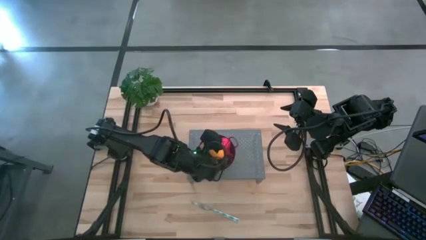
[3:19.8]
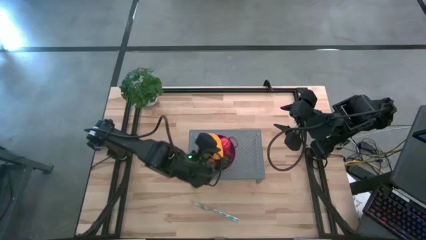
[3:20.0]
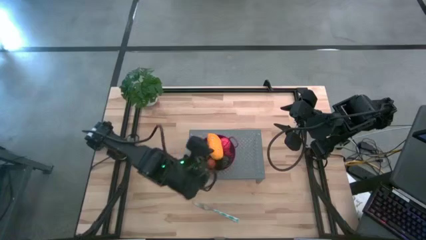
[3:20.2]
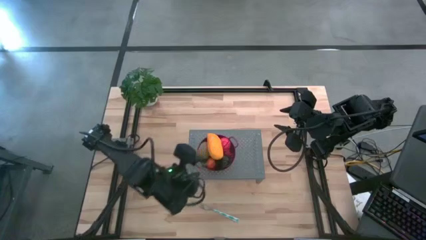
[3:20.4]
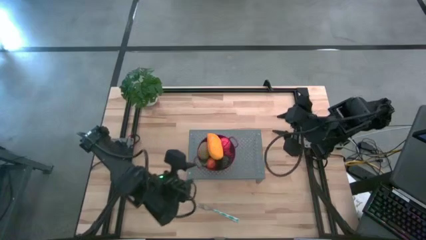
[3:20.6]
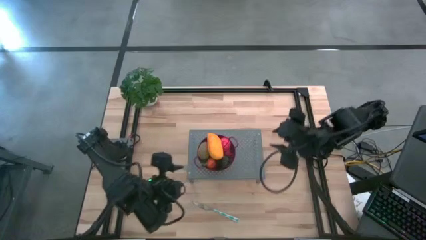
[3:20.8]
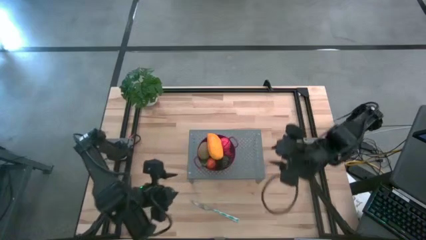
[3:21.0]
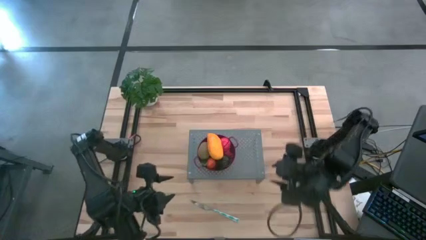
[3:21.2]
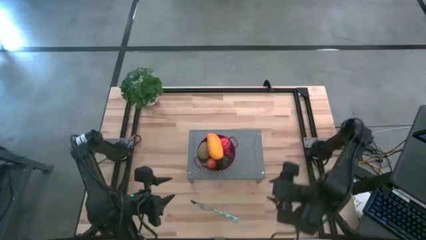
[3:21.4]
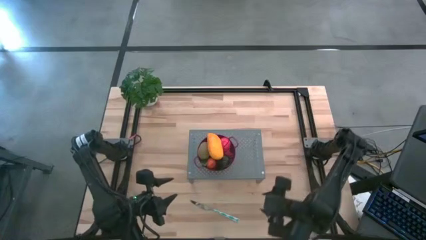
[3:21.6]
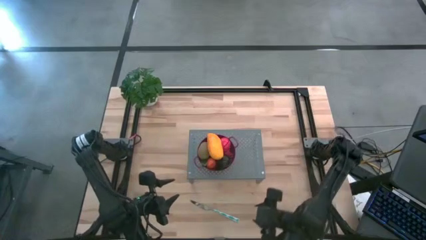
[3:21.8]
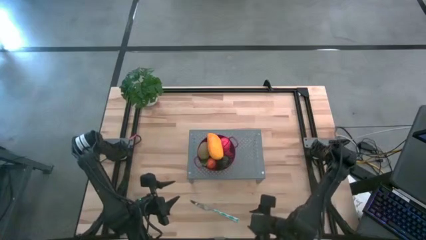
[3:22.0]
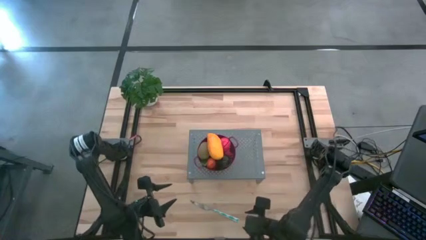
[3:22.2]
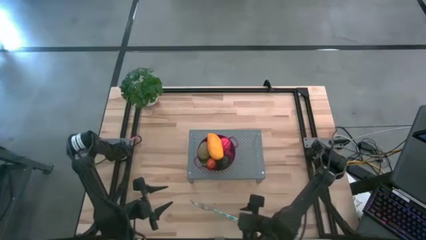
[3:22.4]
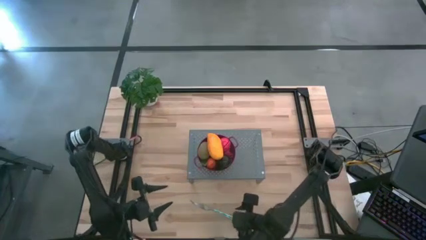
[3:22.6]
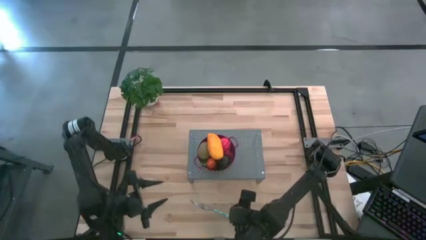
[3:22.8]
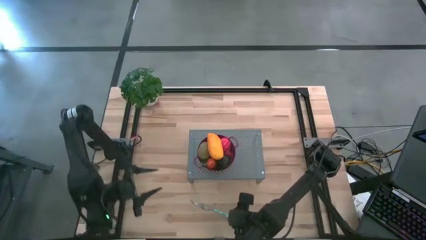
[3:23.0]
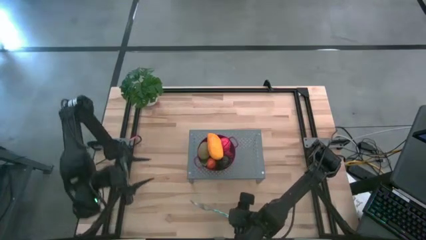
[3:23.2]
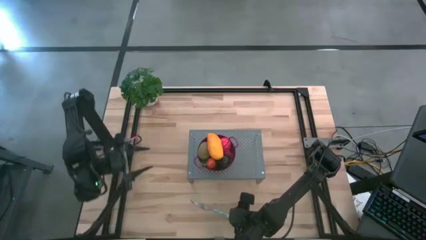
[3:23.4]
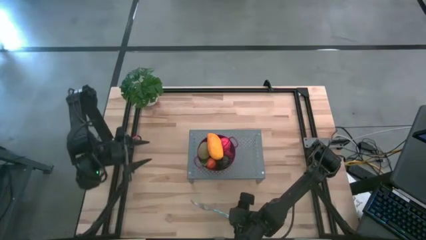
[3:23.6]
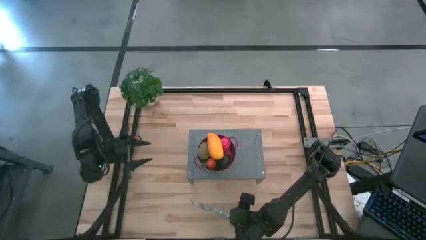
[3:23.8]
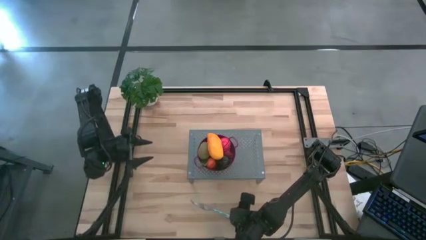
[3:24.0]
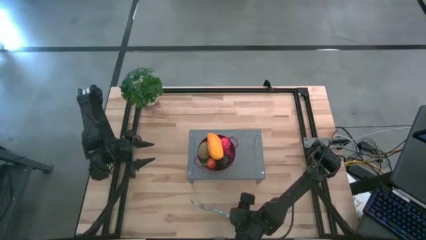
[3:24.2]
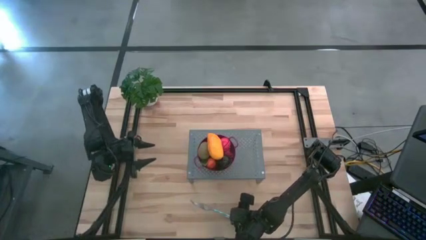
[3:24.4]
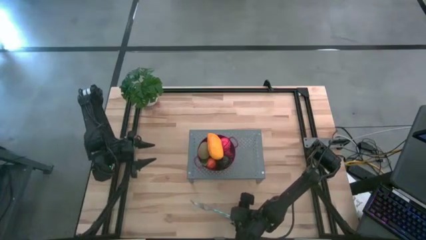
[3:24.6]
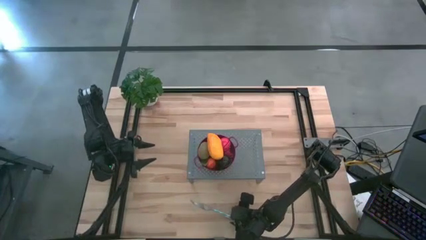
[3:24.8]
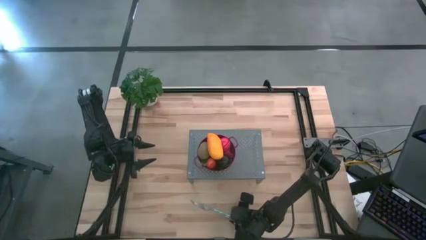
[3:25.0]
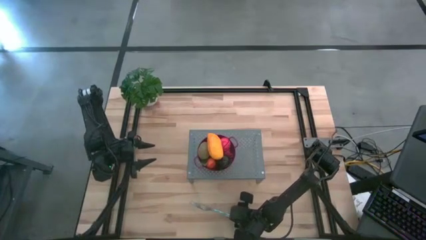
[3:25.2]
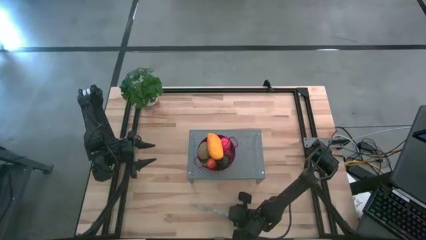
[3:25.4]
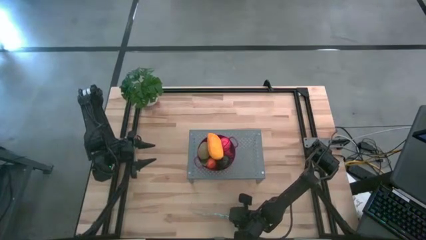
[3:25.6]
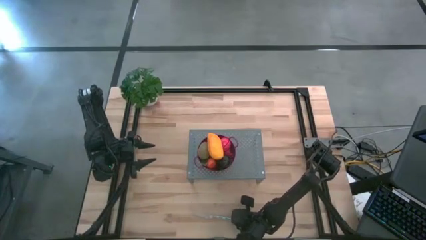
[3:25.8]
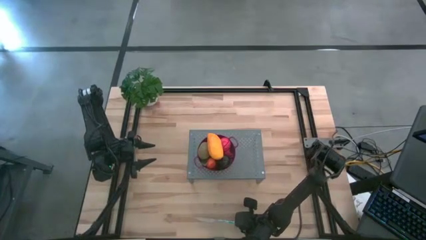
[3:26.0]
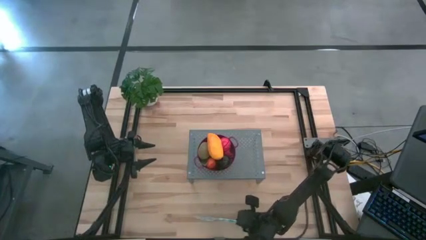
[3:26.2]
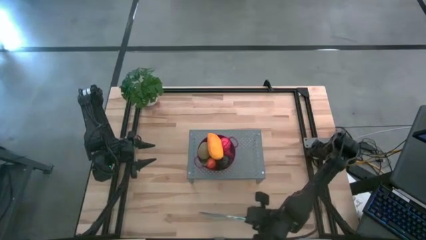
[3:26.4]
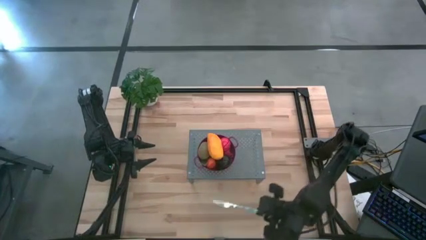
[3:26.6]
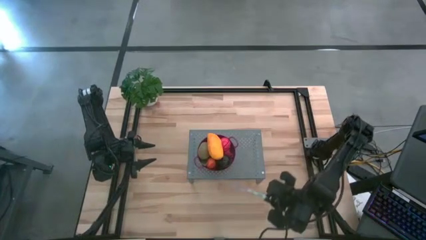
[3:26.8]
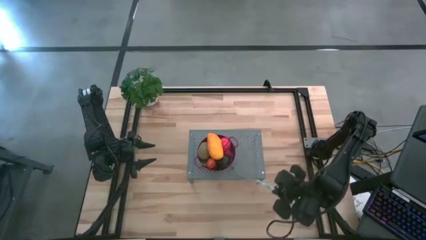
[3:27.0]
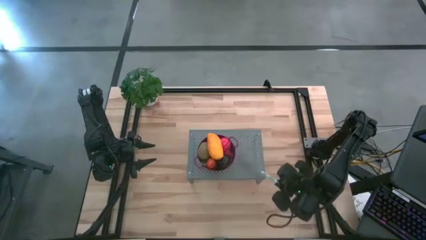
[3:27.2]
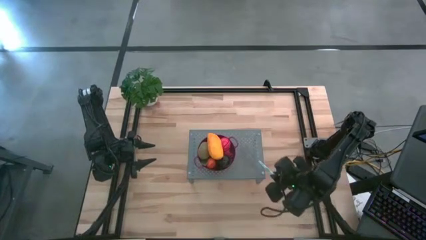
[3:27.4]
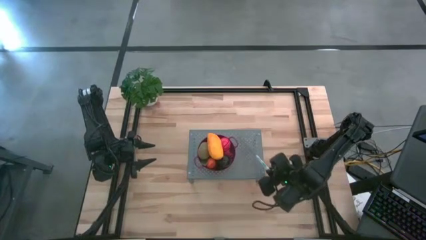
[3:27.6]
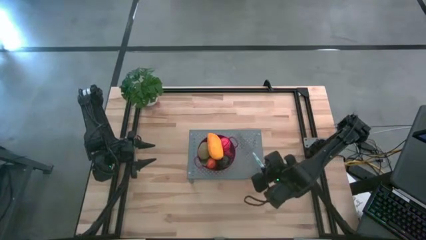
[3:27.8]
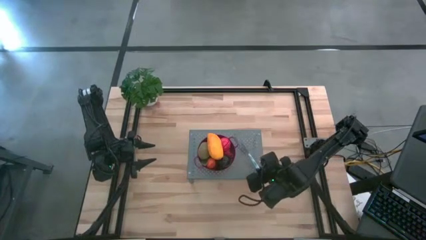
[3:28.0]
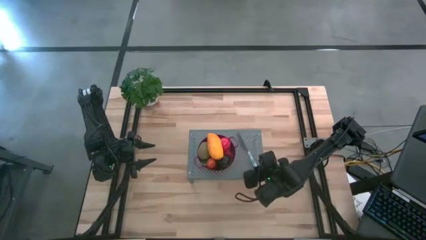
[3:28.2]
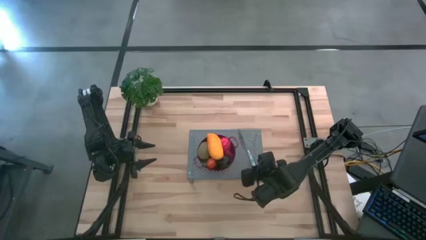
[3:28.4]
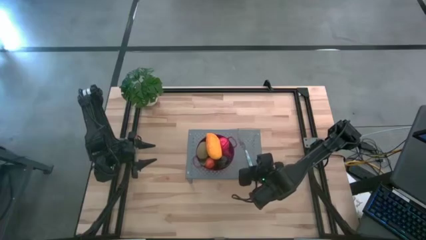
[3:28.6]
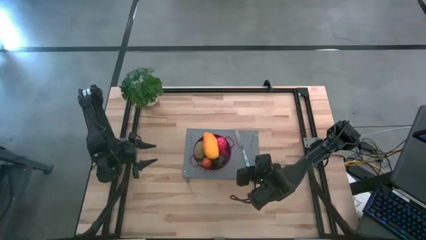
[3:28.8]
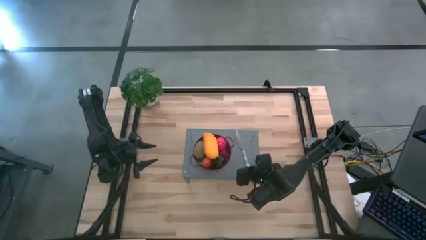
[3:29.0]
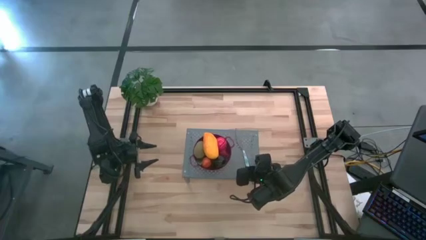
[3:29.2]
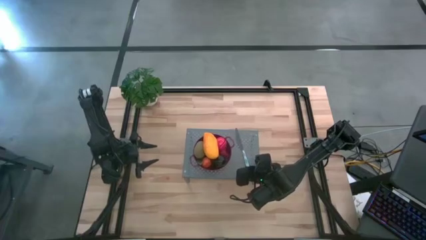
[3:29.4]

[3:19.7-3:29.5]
Task: Pick & Place Fruit
Put the white blue table knife on the shelf

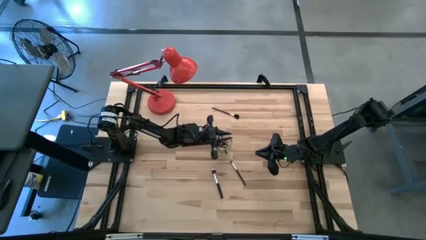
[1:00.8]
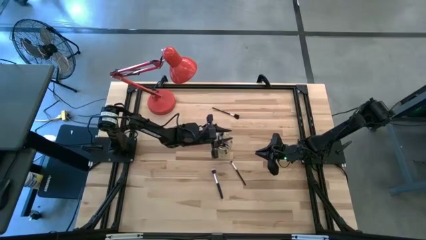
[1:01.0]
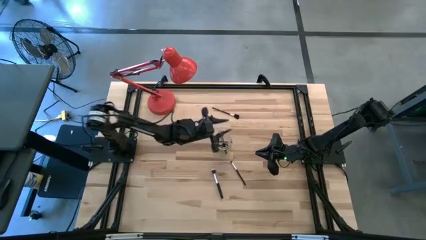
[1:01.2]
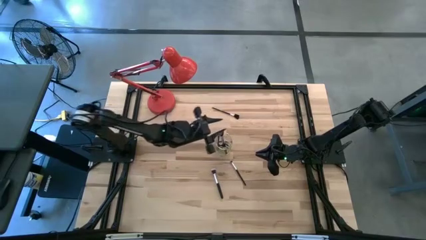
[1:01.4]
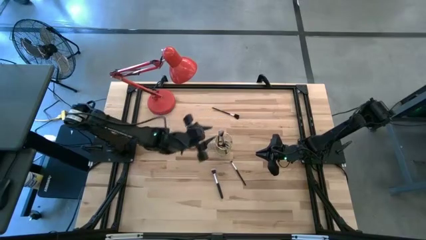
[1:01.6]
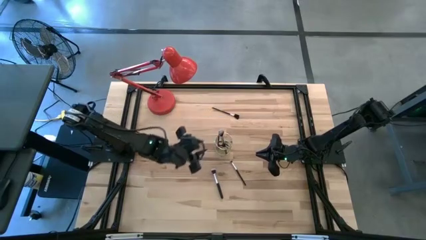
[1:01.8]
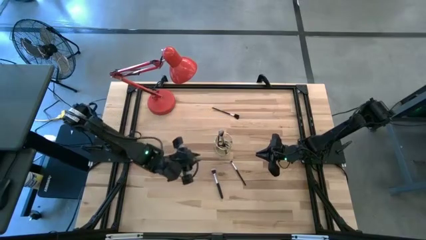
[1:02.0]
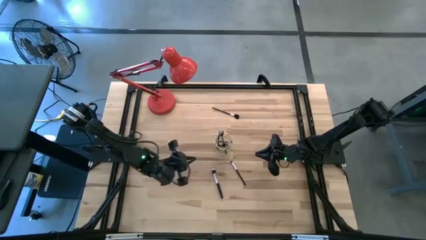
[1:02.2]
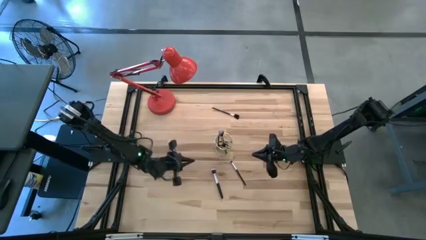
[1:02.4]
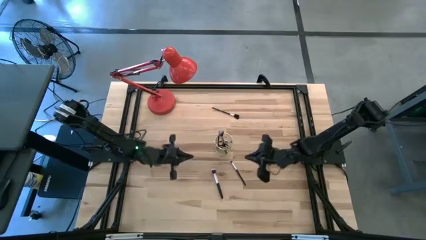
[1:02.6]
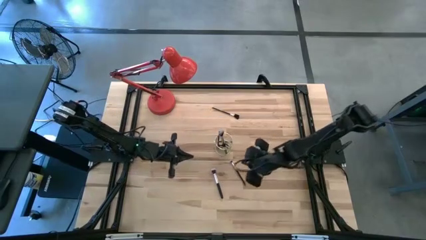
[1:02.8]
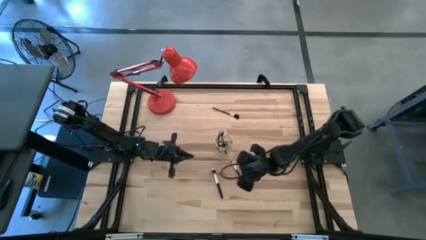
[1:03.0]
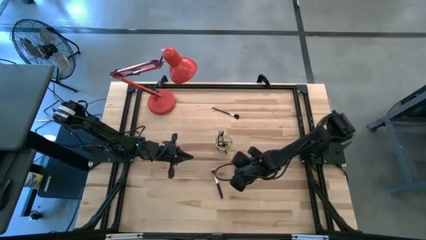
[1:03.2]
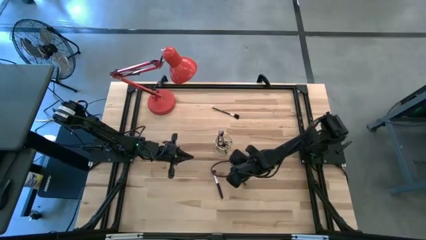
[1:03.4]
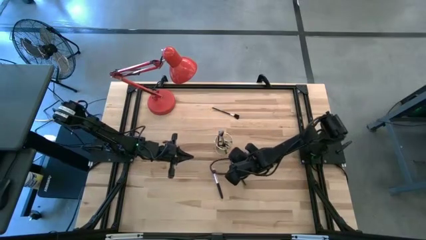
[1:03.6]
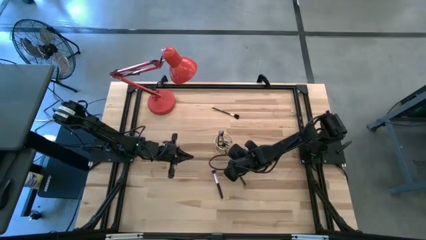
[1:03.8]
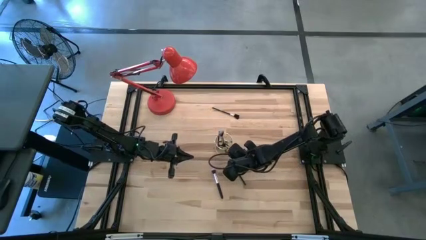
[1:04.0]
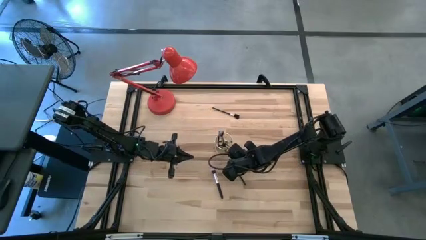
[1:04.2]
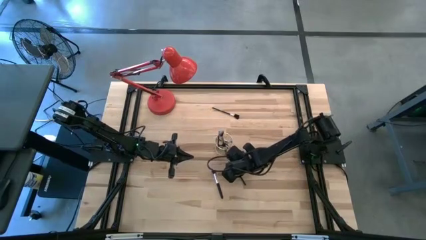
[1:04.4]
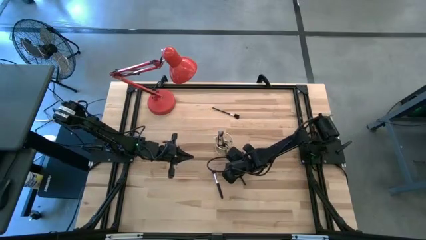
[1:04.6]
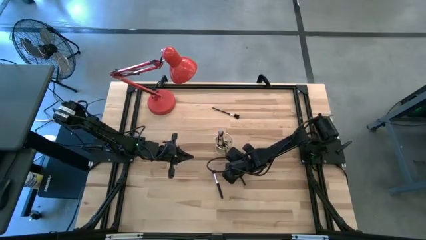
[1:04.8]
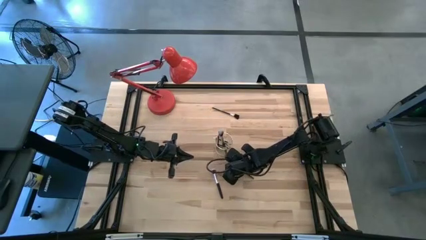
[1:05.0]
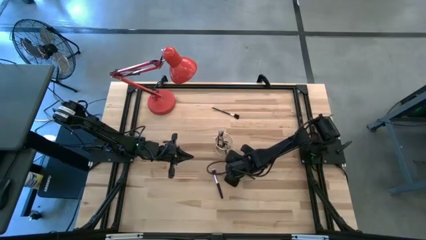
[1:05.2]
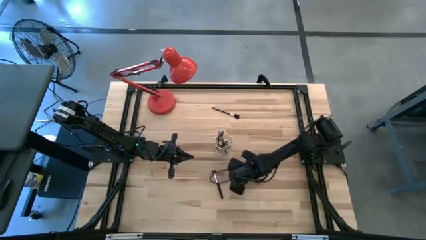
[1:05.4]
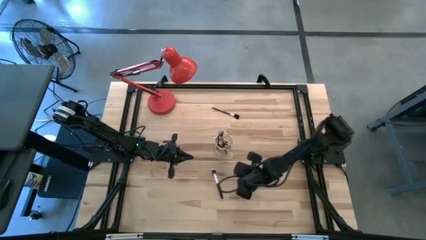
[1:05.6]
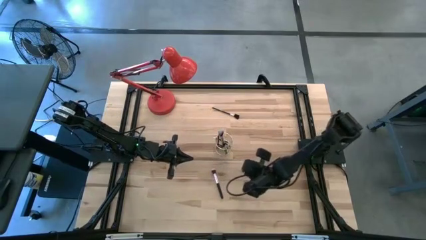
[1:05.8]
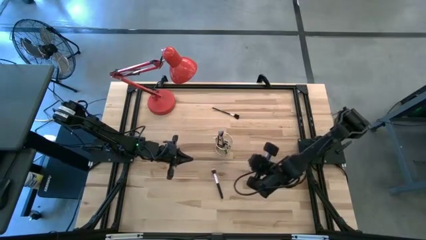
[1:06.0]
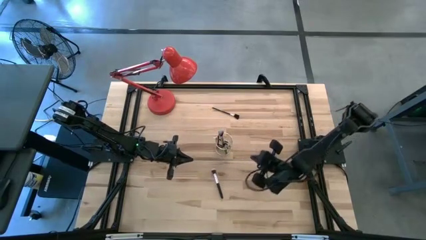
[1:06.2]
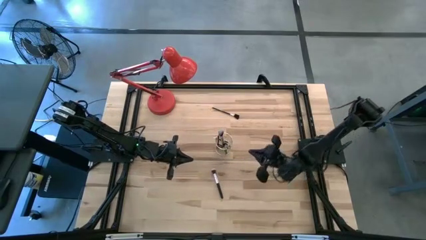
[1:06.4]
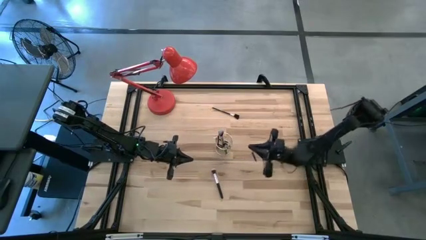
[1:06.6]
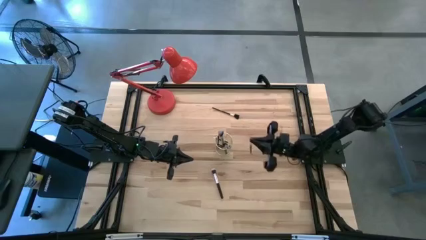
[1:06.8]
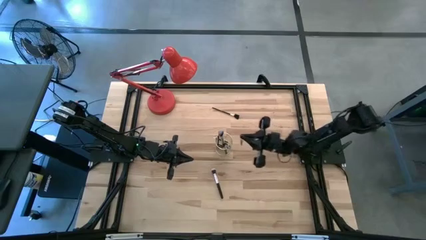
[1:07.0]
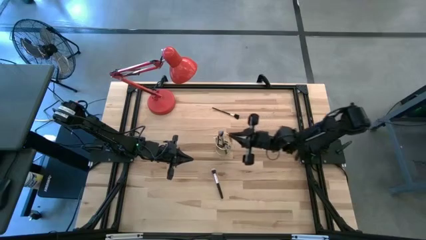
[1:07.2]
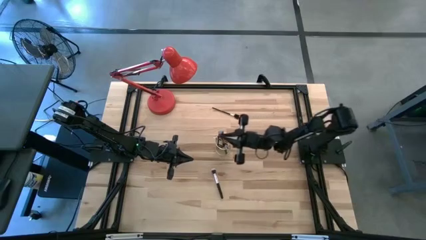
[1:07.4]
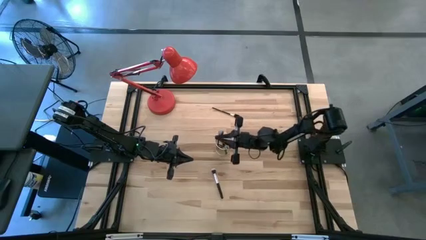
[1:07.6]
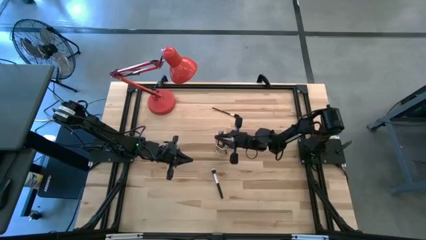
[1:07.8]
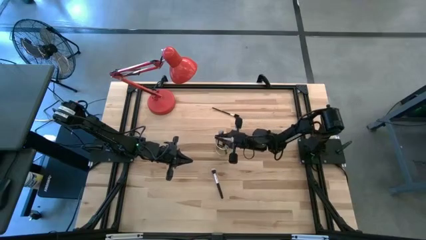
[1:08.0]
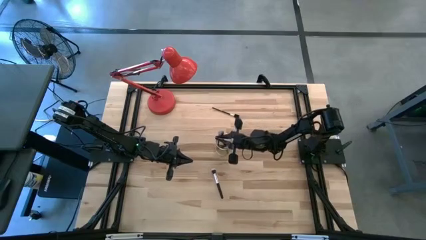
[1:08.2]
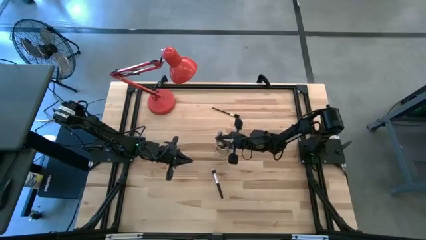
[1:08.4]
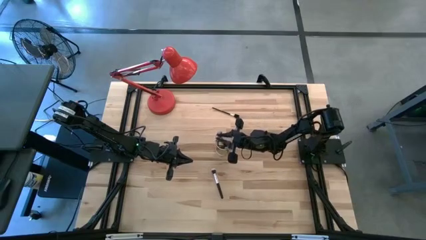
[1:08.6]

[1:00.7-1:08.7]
Task: Put items in baskets/containers
Put the eyeshadow brush into the wire organizer
